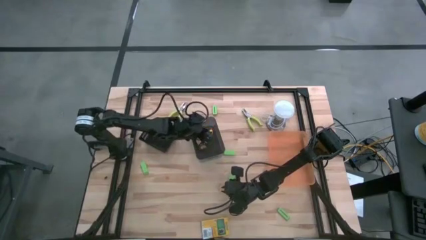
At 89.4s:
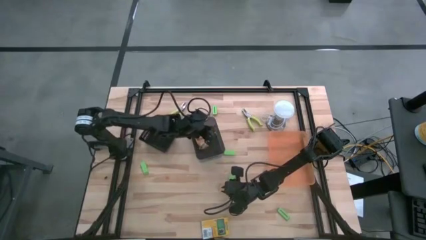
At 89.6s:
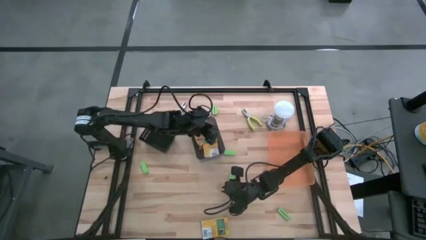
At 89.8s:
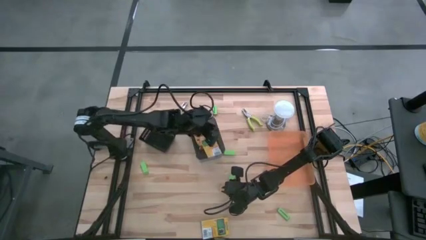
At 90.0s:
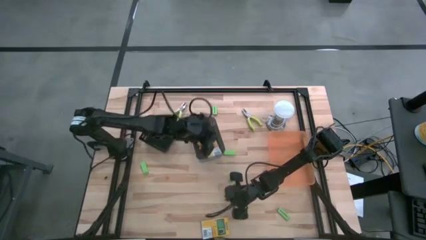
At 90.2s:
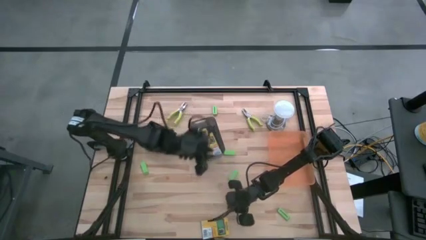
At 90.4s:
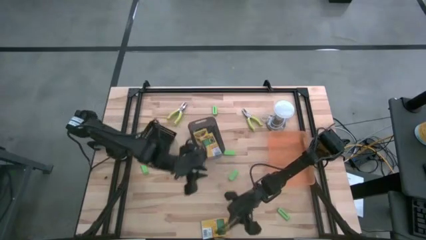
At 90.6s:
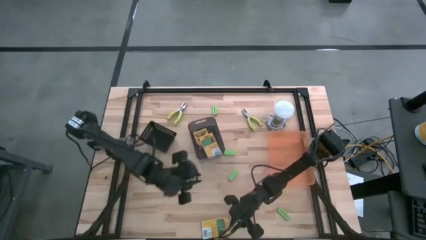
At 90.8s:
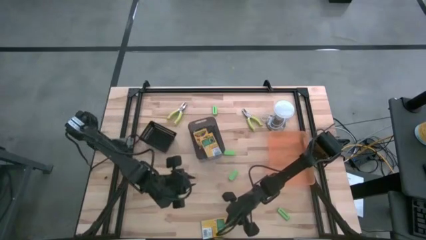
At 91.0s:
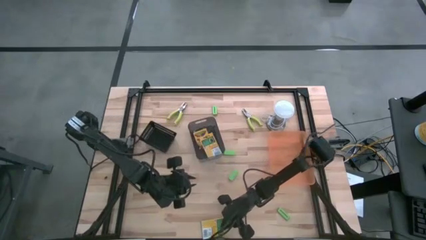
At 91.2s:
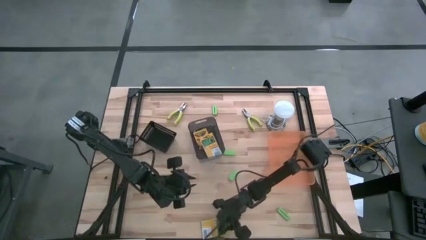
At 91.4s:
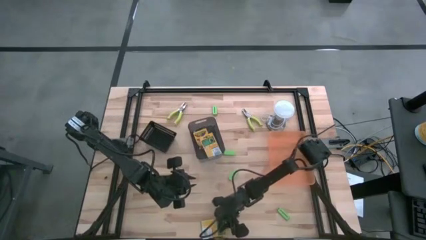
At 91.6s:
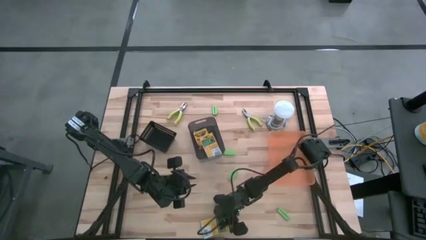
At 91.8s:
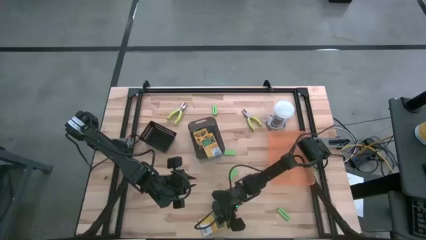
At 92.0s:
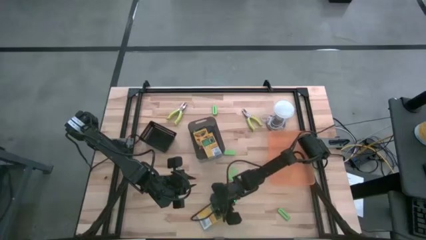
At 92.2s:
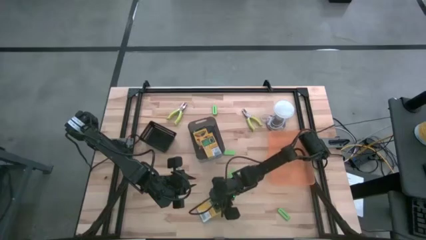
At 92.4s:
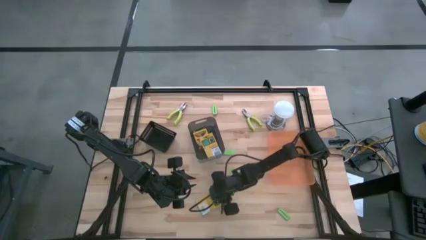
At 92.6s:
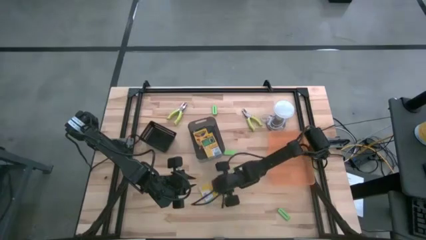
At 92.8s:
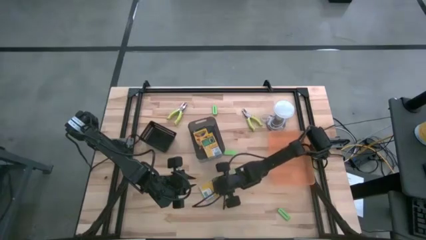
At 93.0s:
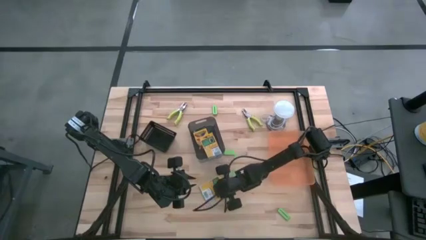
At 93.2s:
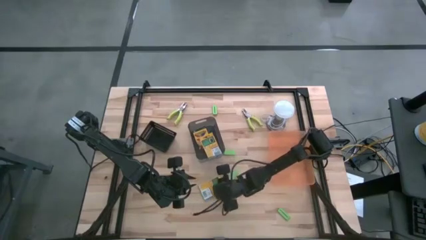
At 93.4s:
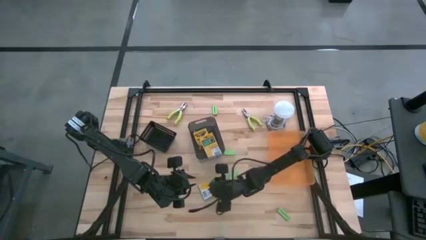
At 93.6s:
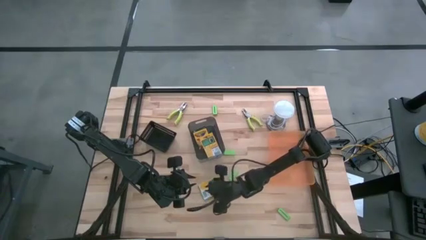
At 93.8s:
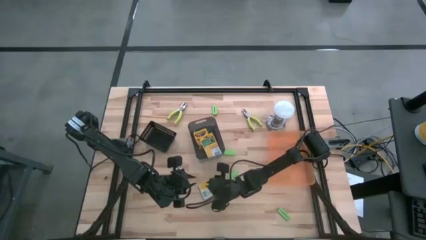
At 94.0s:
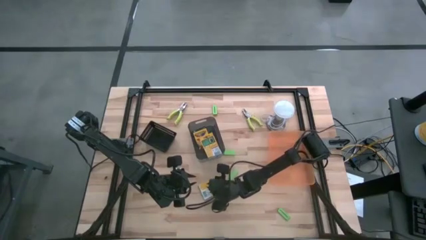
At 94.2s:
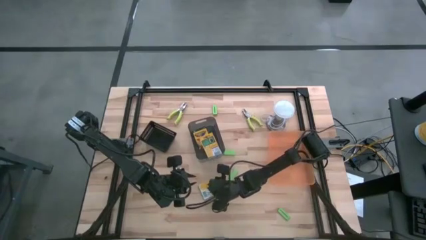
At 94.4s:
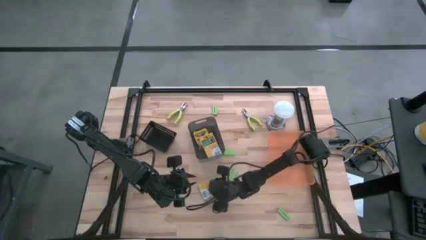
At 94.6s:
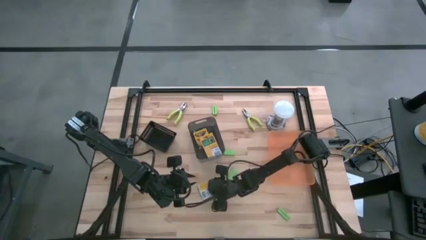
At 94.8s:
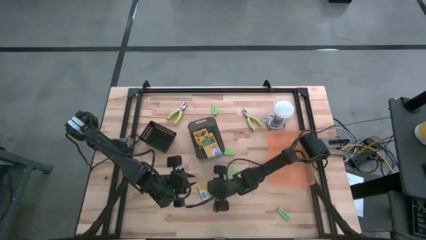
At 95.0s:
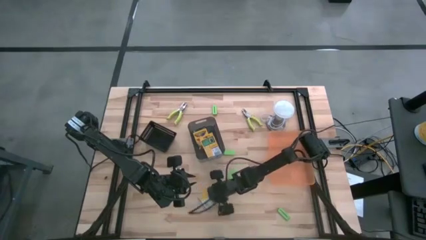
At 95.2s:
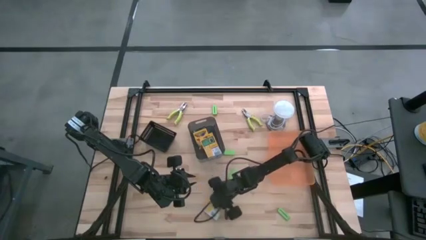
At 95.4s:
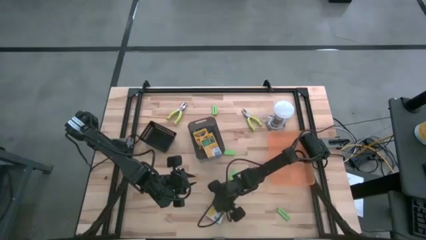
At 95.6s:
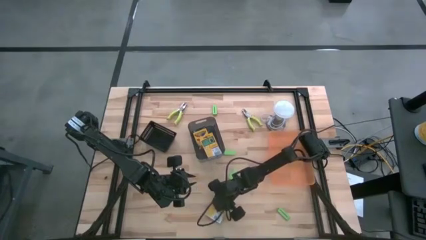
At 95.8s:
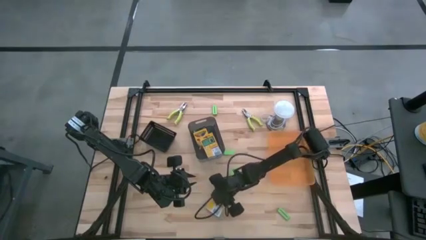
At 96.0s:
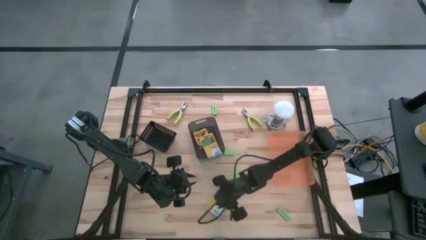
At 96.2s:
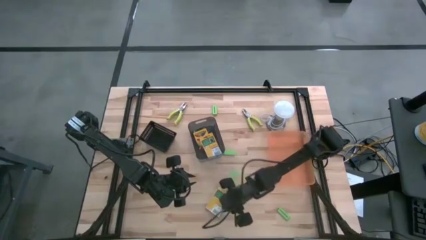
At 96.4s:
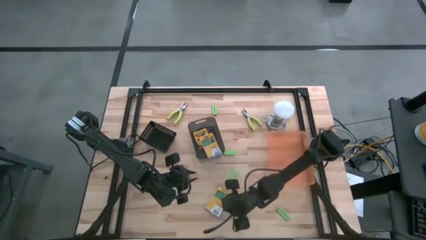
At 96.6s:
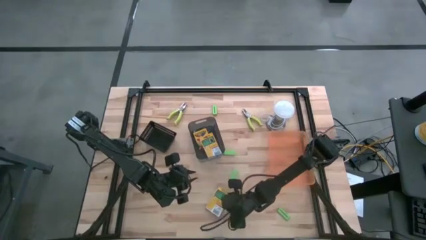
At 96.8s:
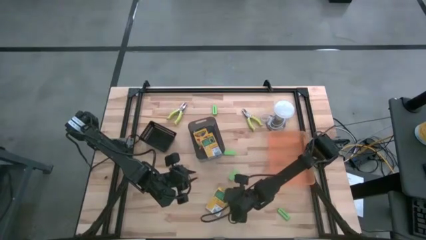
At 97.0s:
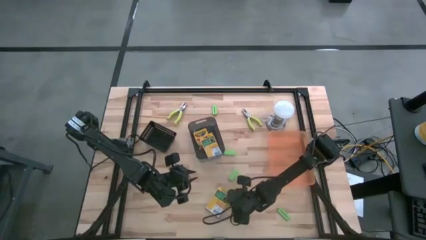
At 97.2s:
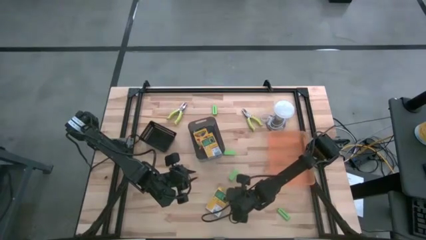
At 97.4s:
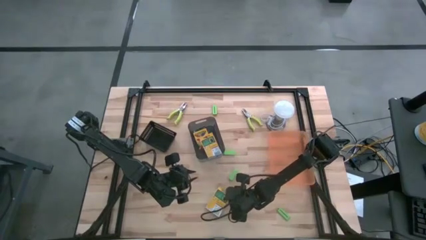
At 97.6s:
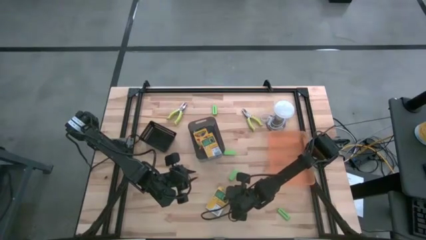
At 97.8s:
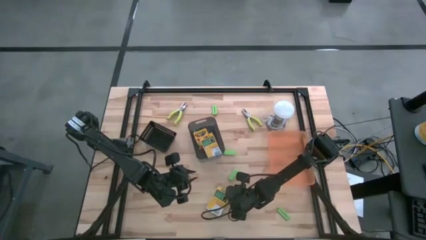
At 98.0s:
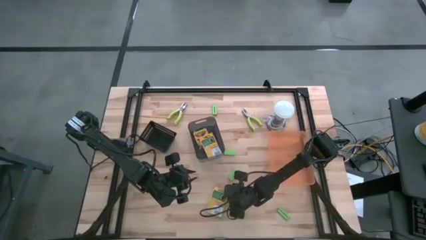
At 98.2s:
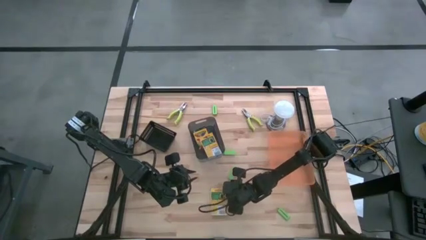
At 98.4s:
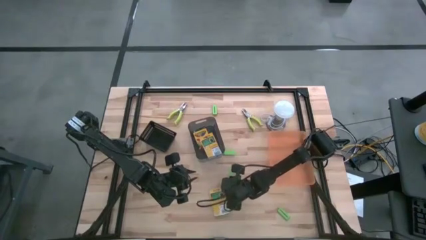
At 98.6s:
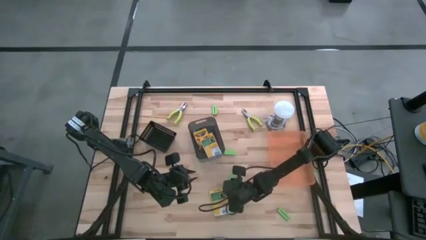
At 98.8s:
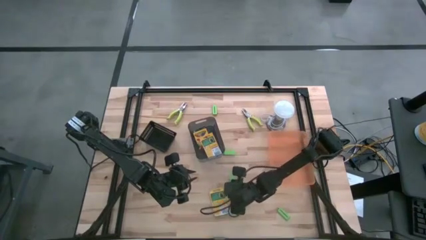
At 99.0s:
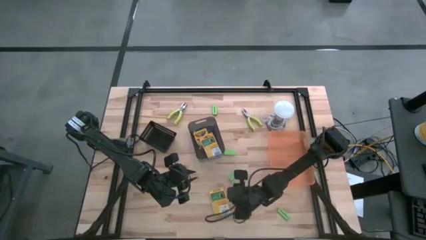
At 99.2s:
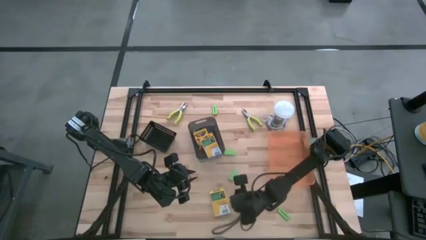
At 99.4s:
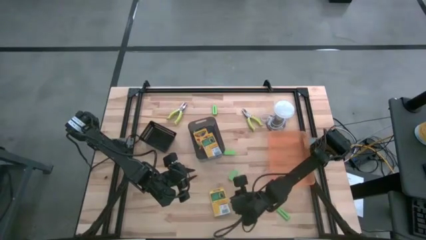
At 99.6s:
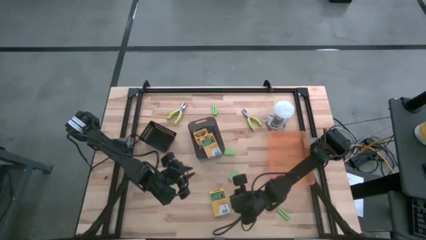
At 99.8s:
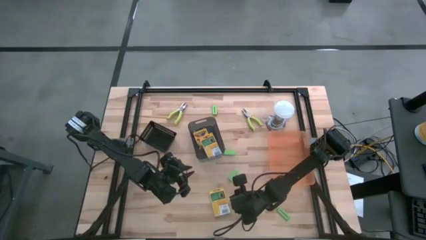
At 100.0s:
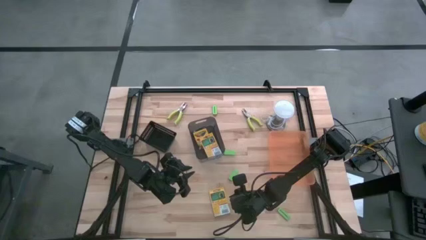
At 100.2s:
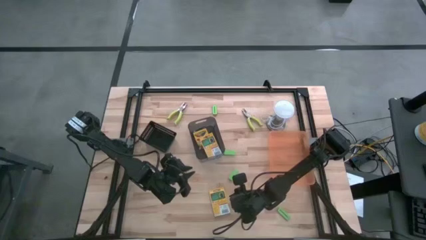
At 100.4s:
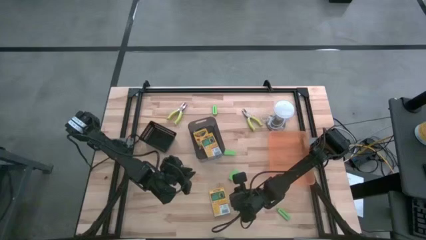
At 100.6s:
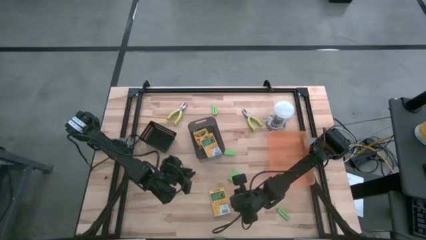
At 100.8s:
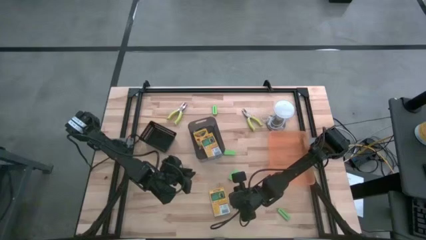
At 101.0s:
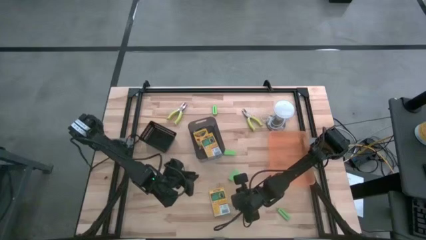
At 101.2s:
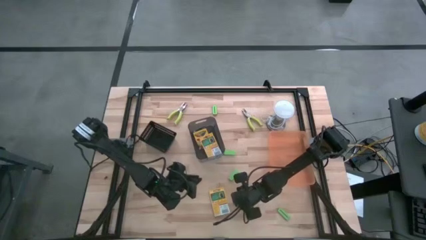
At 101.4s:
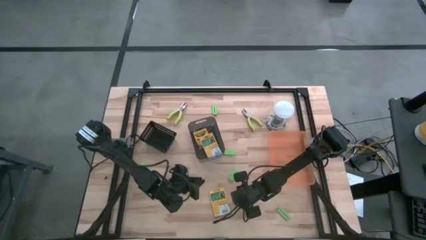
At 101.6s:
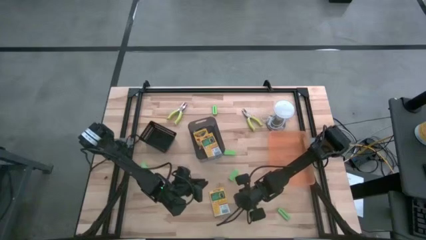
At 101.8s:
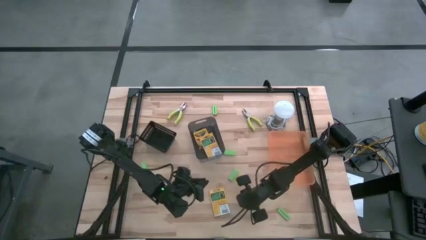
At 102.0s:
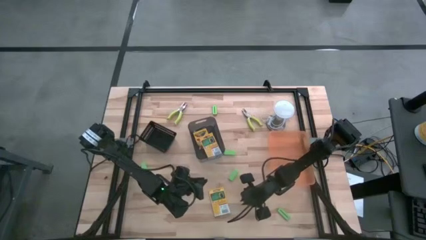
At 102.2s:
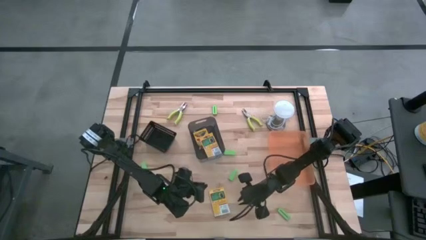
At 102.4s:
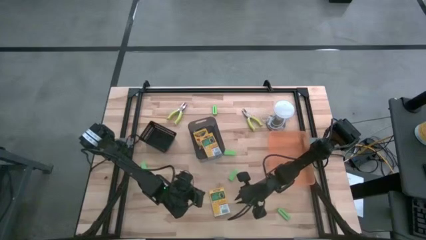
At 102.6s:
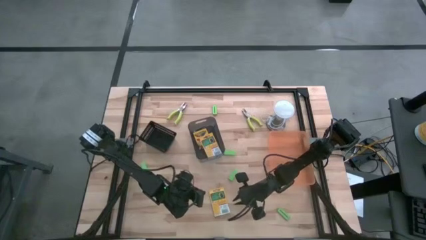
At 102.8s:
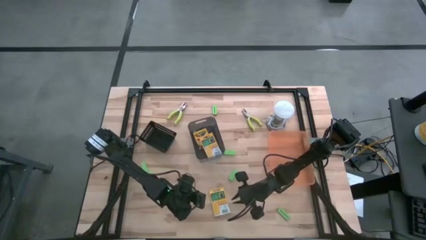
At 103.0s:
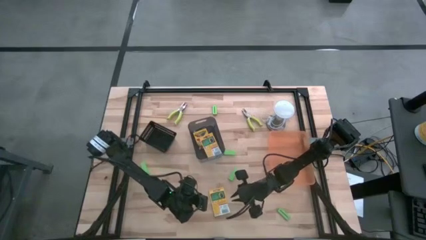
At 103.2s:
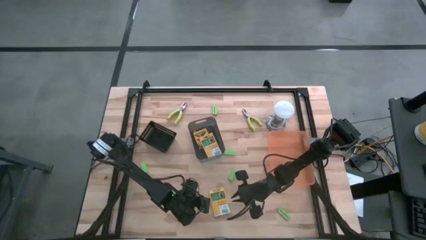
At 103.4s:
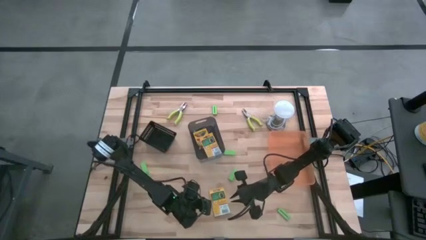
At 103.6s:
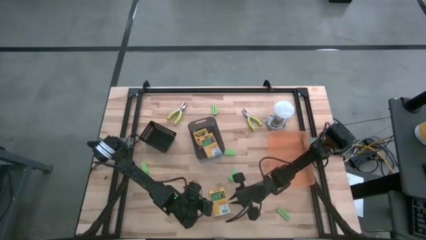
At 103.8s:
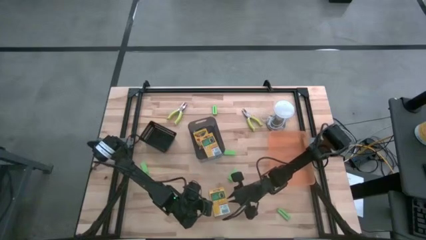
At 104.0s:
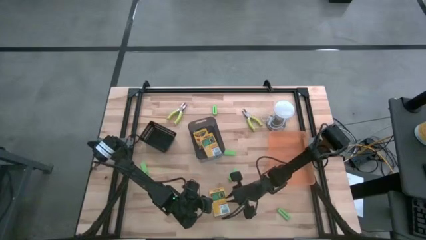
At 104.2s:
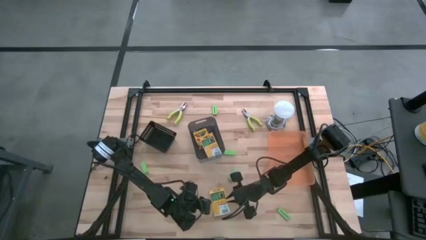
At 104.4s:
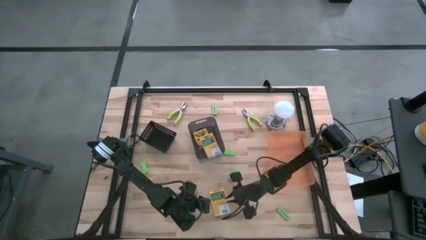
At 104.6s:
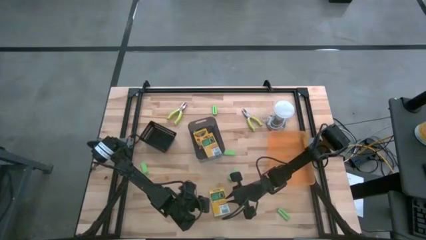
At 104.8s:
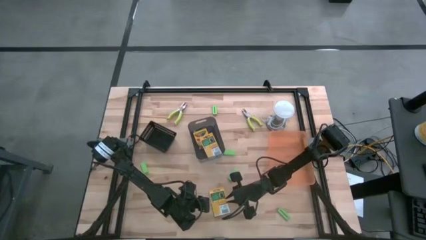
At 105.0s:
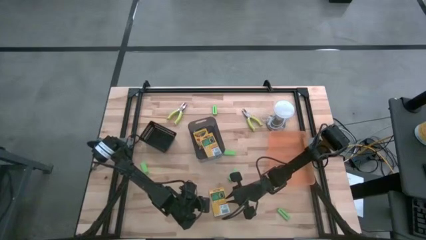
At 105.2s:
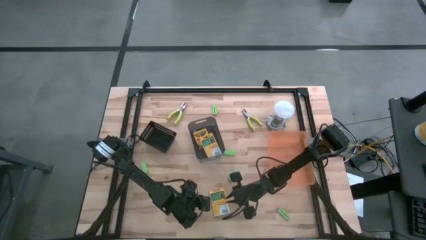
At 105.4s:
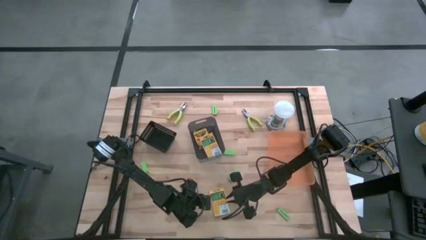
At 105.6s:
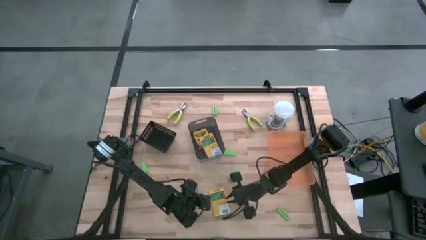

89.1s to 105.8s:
Task: Pick & Place School Supplies
Put the yellow crayon box into the black transparent bin
